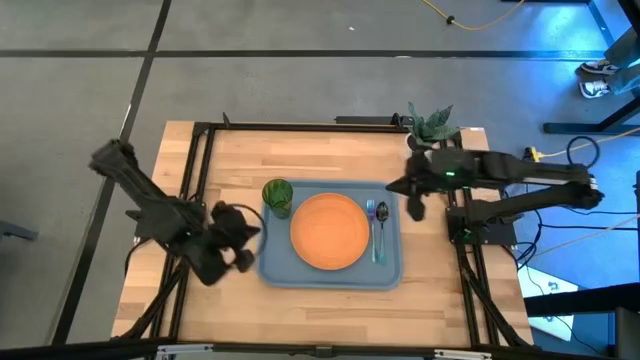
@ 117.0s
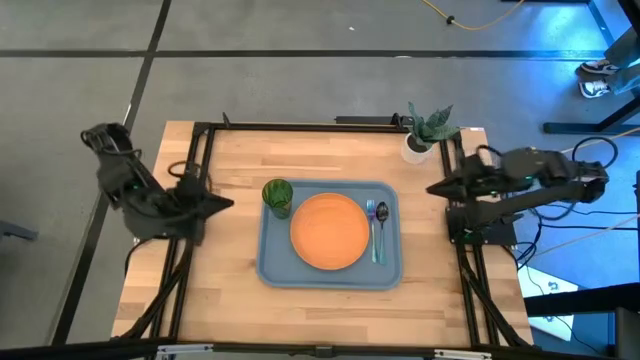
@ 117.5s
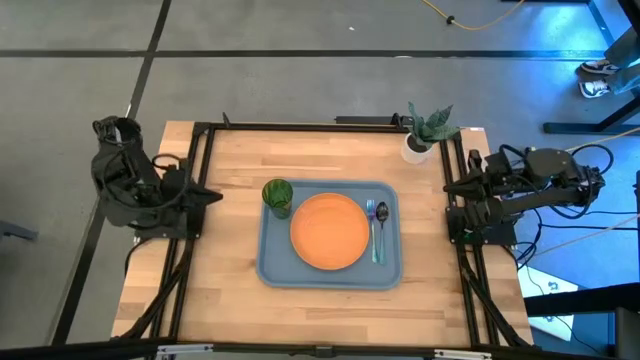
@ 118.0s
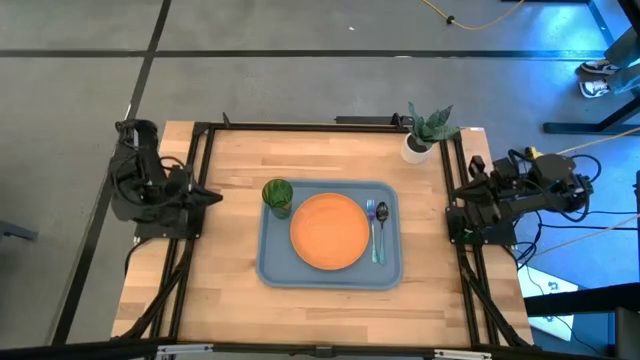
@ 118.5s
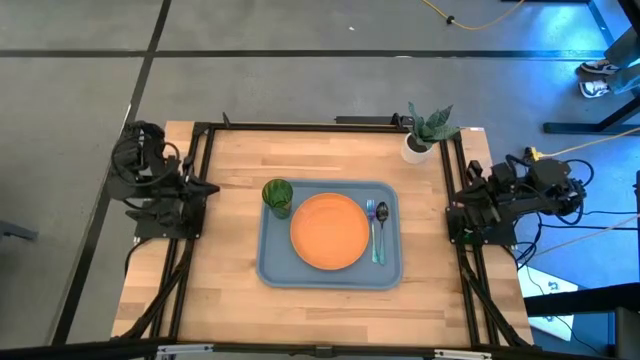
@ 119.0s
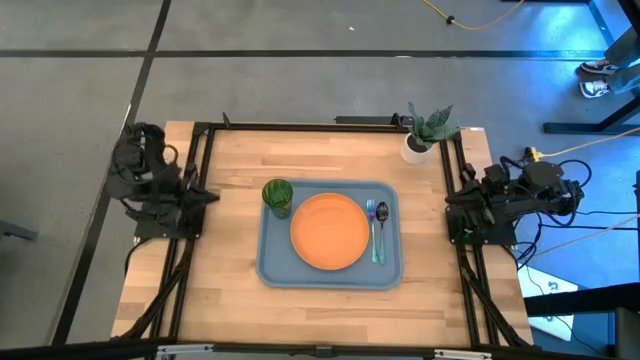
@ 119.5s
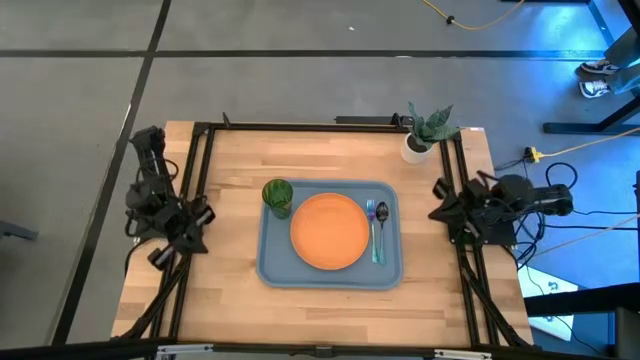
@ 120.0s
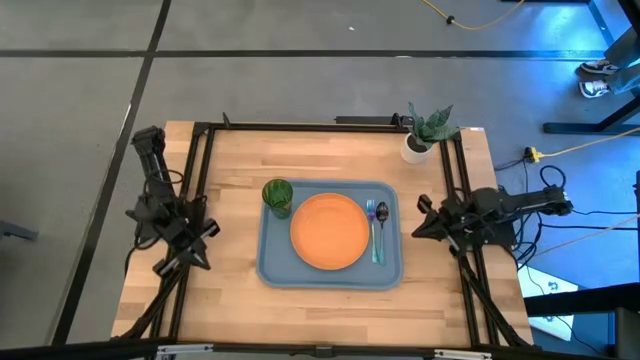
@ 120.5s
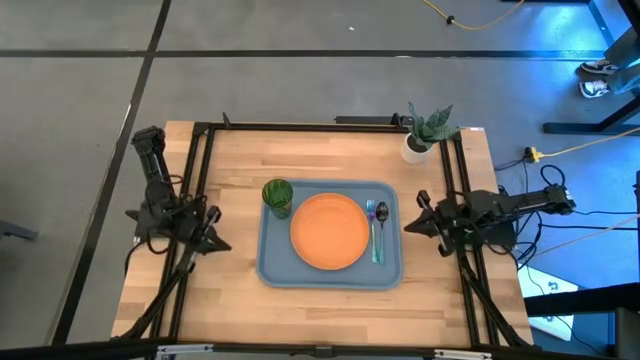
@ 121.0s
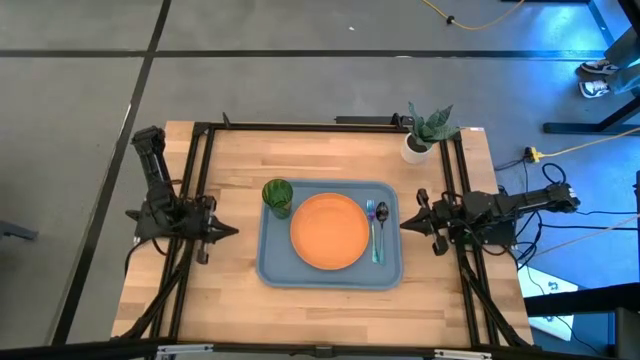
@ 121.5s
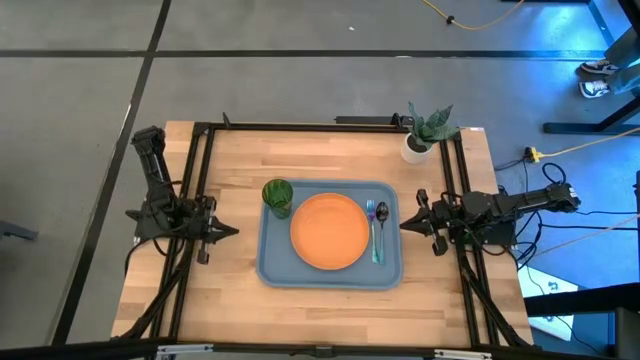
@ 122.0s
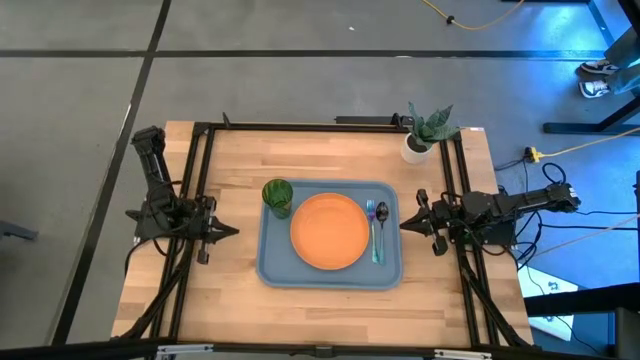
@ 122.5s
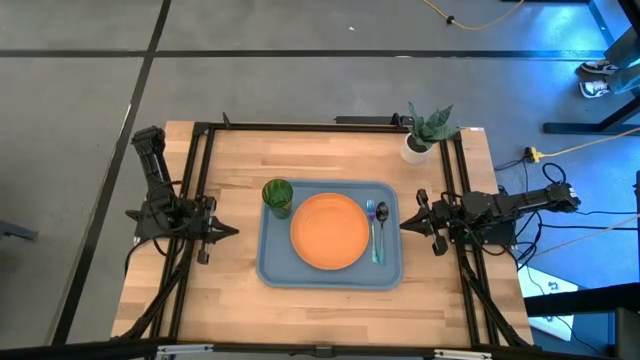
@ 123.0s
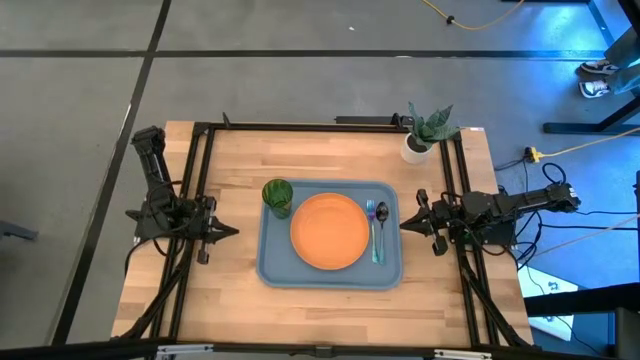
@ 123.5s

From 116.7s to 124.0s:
Task: Pick and place plate/cup/fork/spoon on tray
Return to Home Position

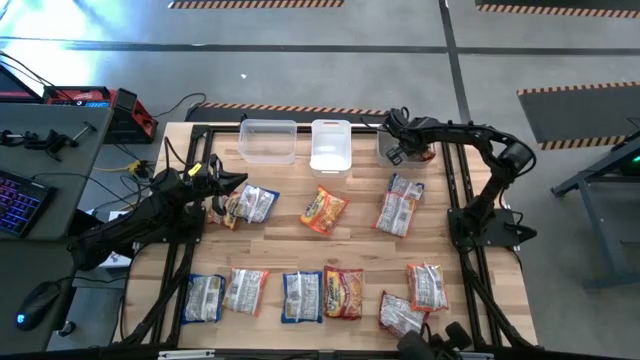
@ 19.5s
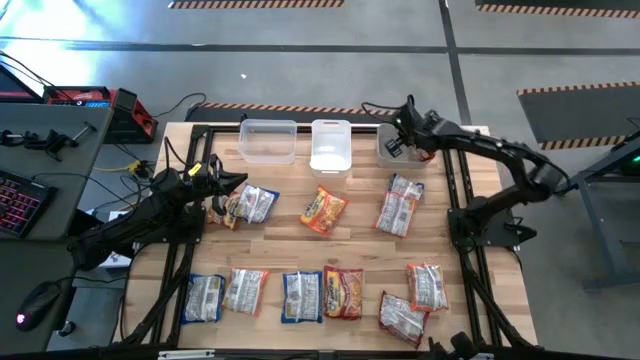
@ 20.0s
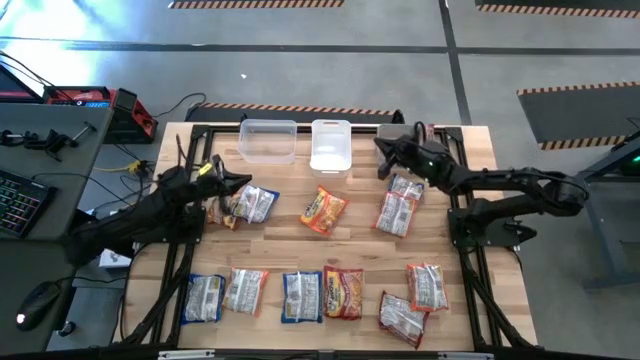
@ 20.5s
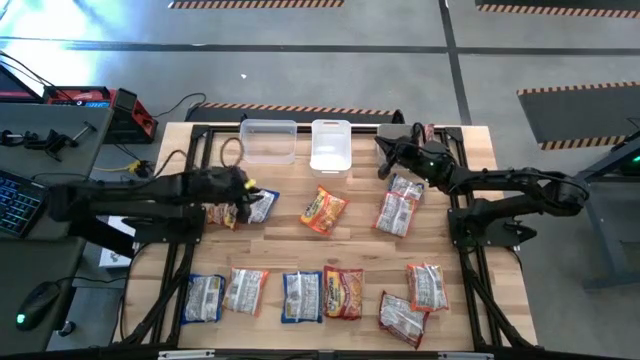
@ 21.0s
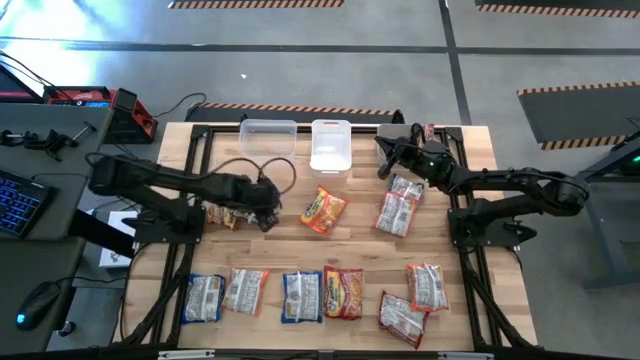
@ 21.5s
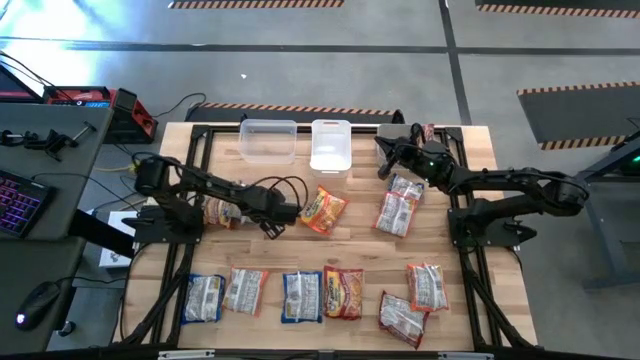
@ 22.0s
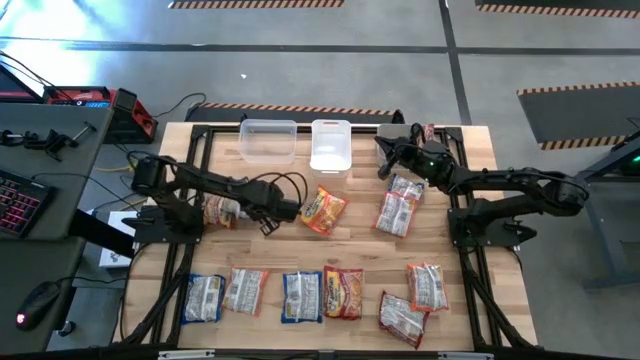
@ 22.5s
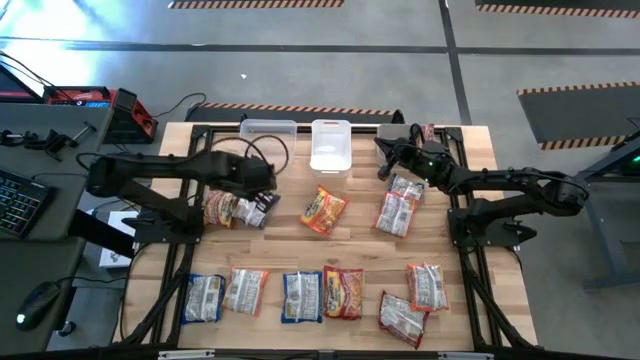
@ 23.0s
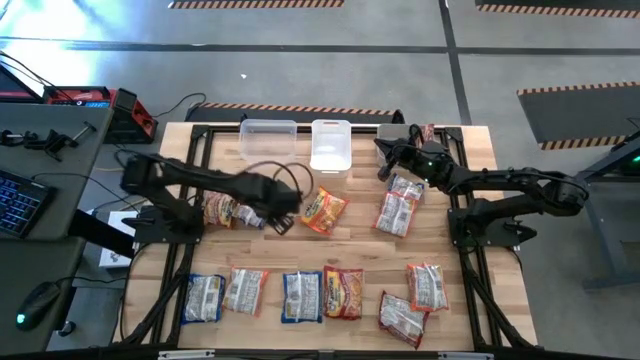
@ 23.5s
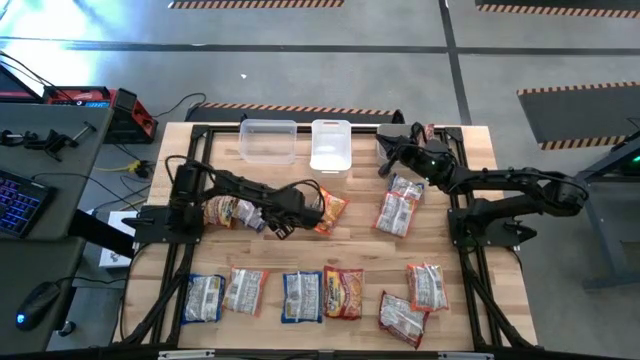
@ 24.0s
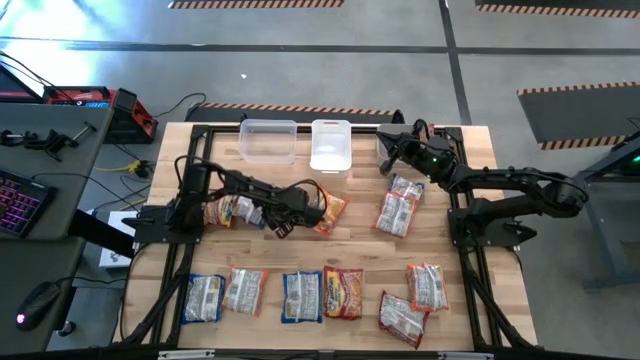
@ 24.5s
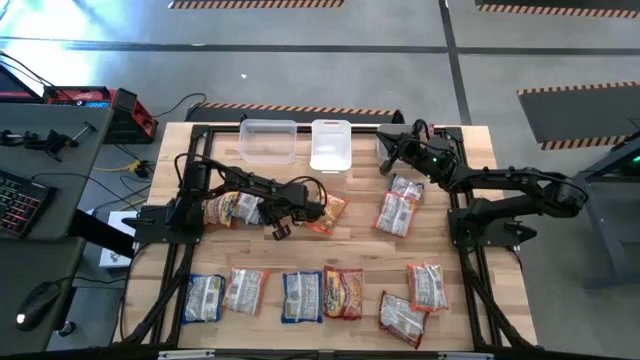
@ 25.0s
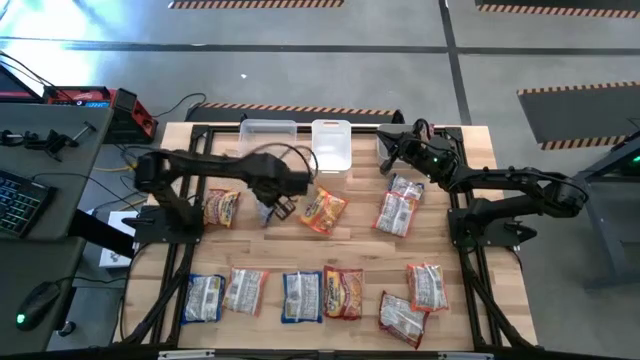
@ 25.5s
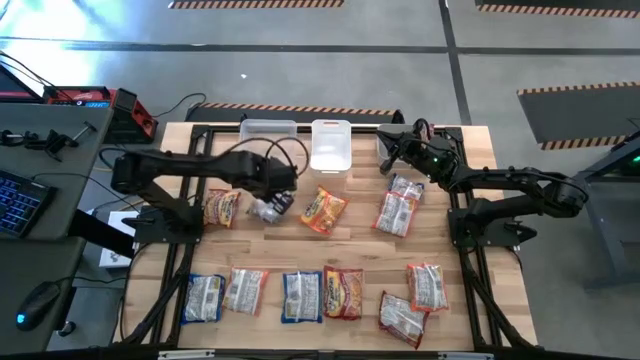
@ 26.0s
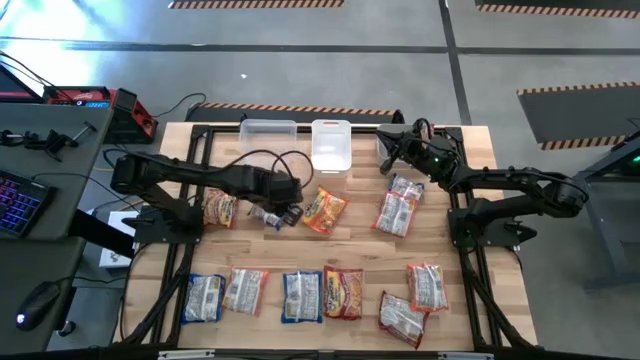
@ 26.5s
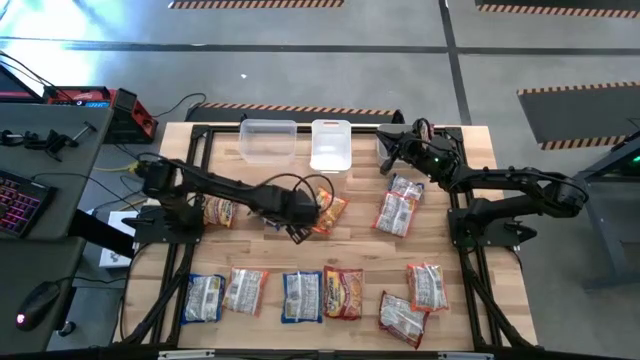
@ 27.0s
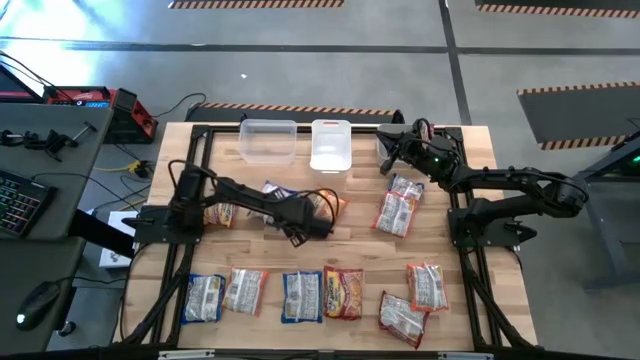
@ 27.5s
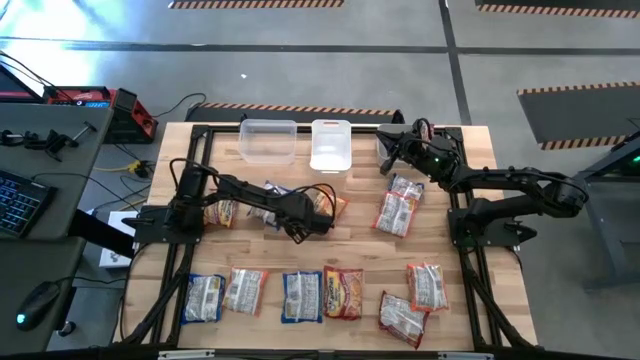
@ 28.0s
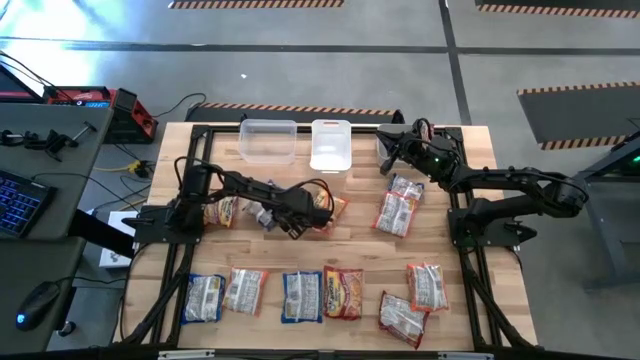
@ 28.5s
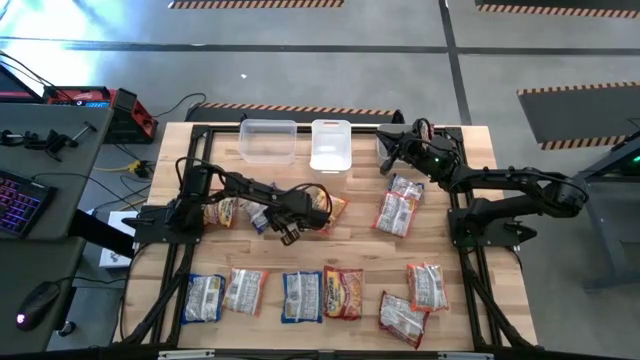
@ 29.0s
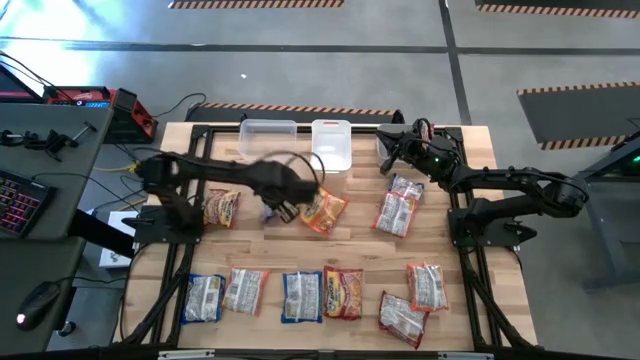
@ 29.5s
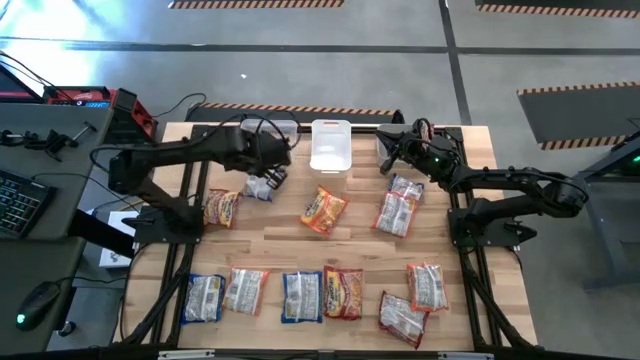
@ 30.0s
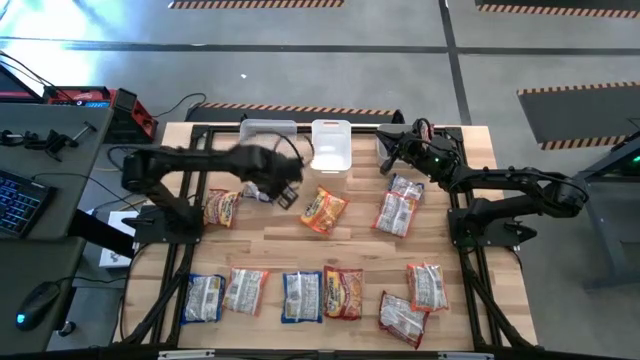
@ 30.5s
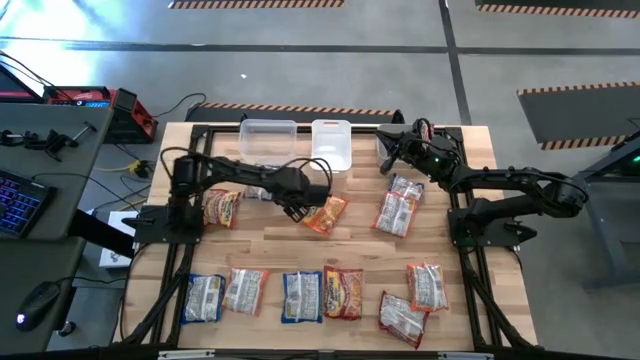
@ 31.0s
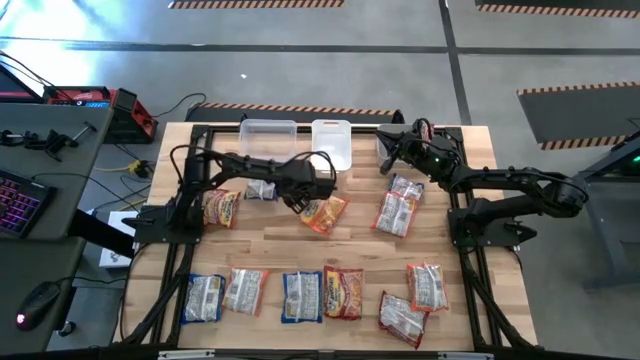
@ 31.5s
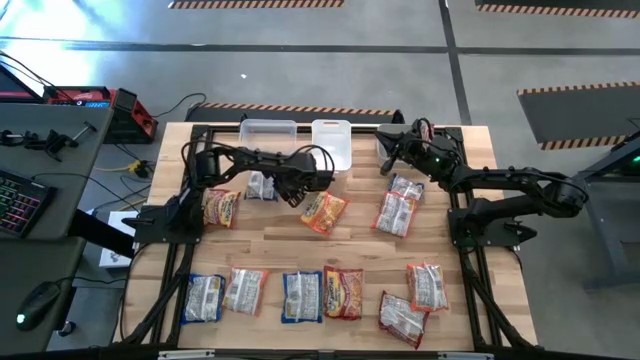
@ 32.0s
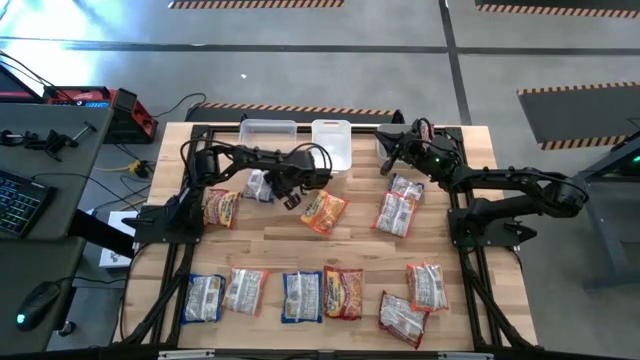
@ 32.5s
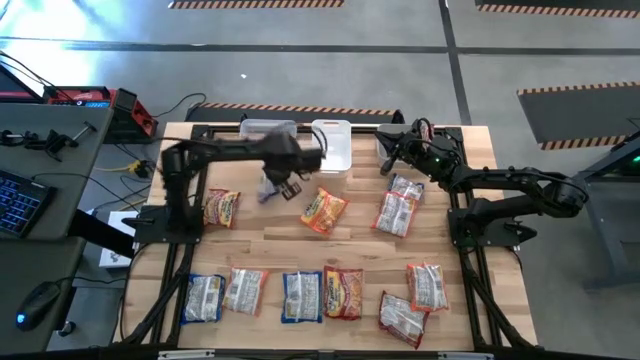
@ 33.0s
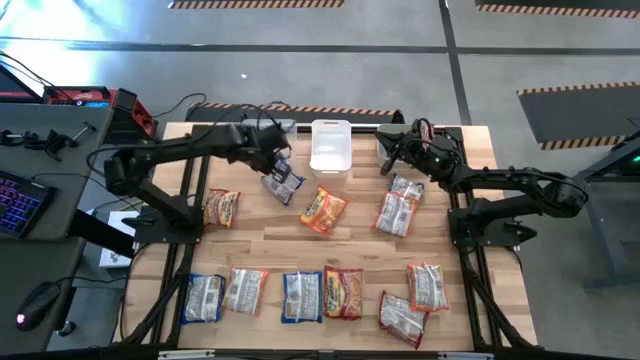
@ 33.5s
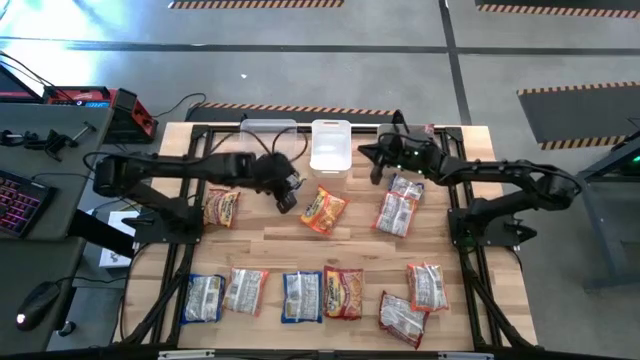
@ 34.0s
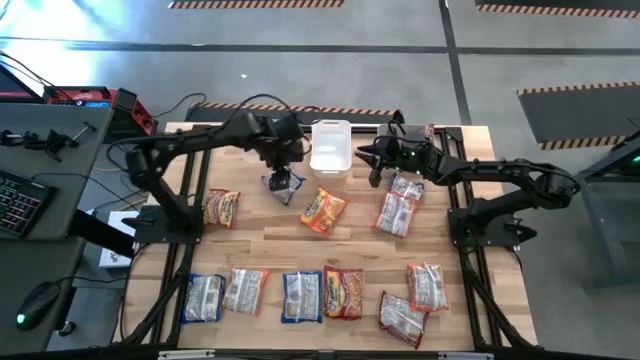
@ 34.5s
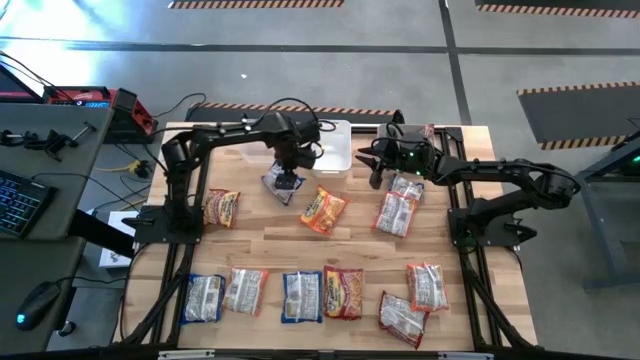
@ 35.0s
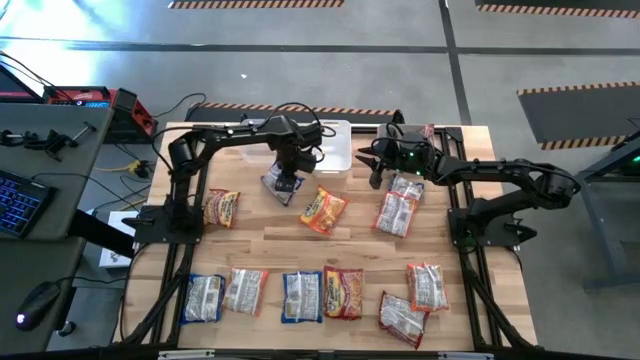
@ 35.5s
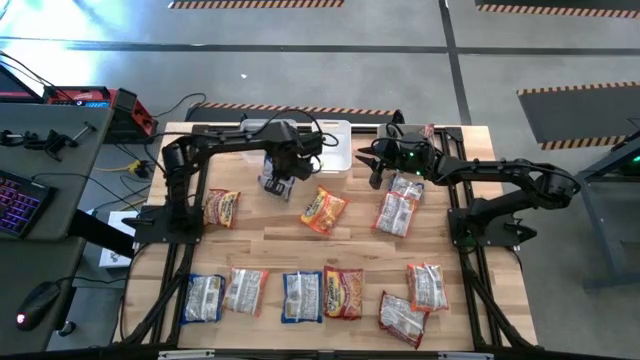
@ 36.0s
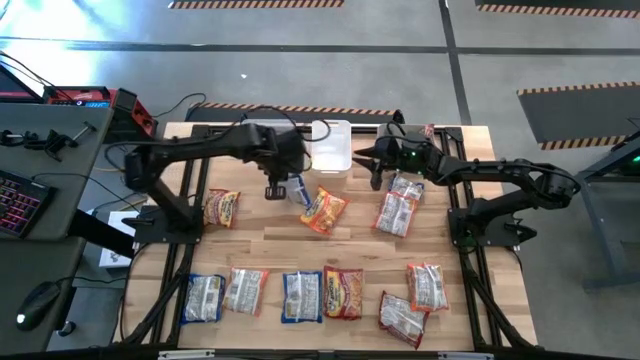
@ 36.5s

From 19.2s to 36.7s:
Task: Sort Maruchan noodles
Put the blue noodle pack into the white bin
